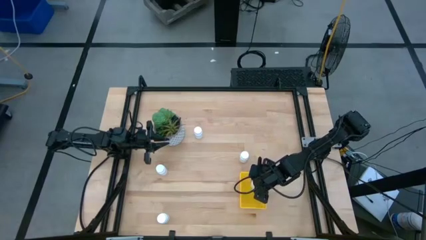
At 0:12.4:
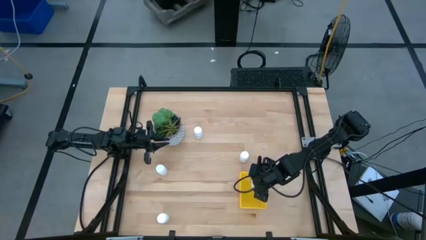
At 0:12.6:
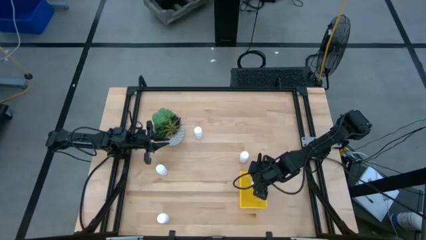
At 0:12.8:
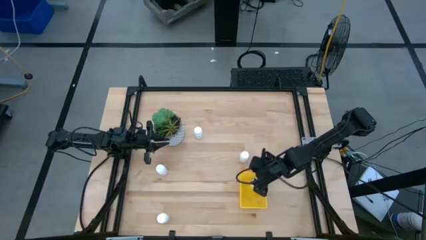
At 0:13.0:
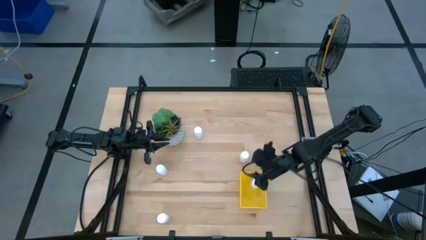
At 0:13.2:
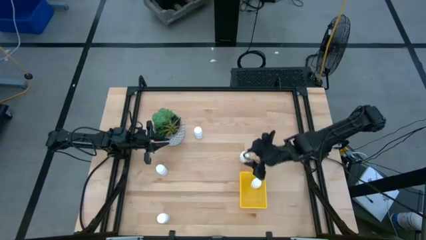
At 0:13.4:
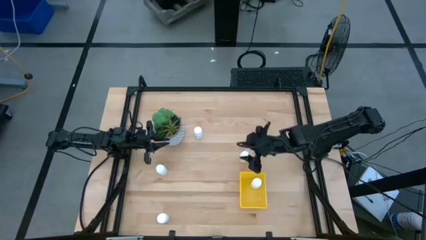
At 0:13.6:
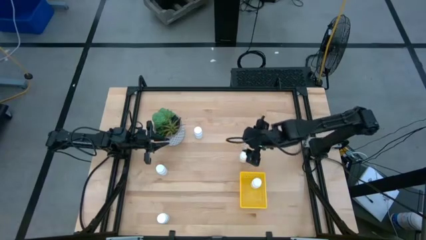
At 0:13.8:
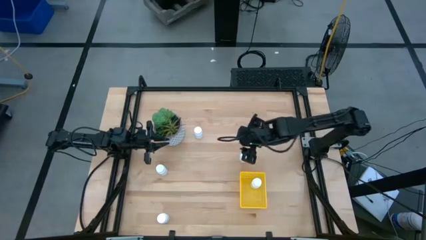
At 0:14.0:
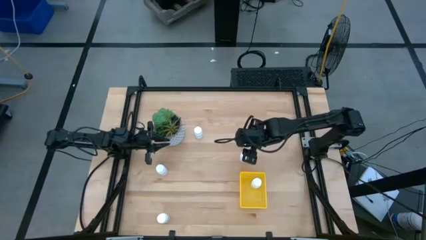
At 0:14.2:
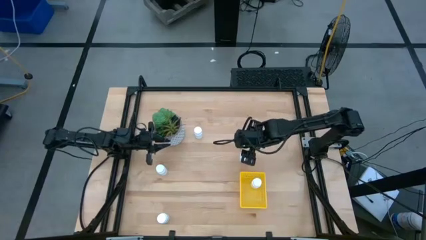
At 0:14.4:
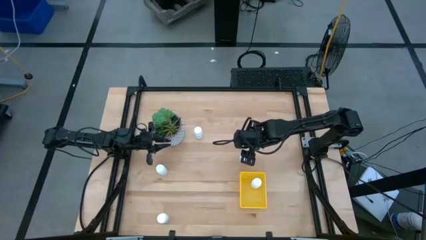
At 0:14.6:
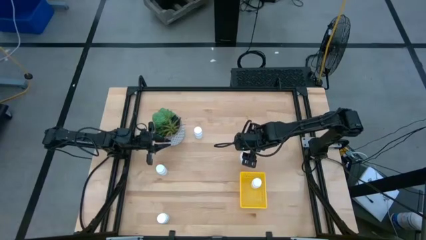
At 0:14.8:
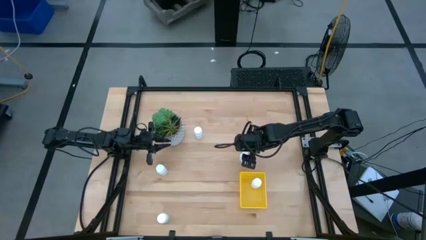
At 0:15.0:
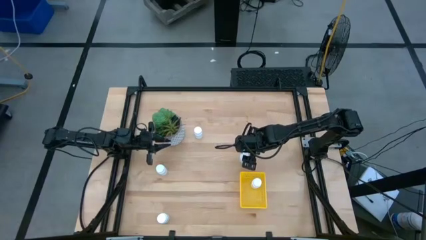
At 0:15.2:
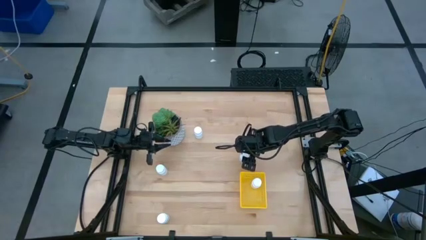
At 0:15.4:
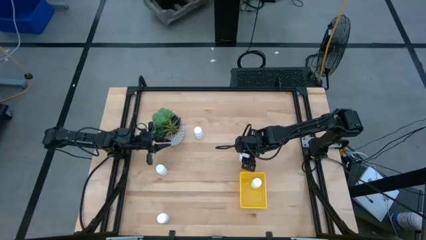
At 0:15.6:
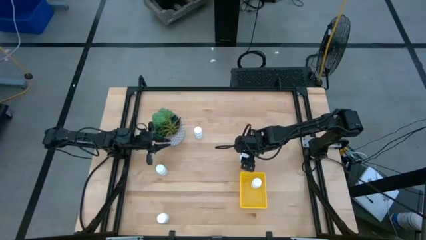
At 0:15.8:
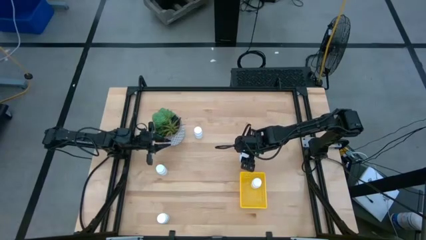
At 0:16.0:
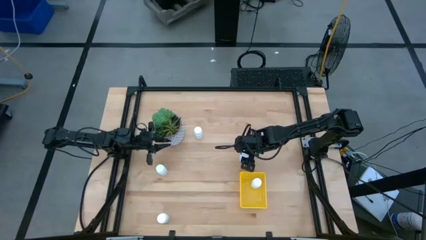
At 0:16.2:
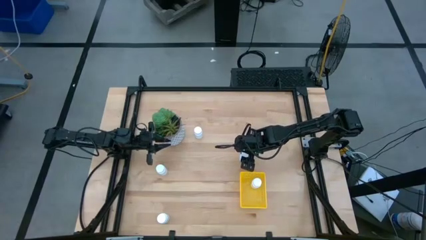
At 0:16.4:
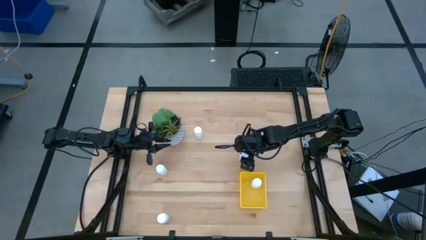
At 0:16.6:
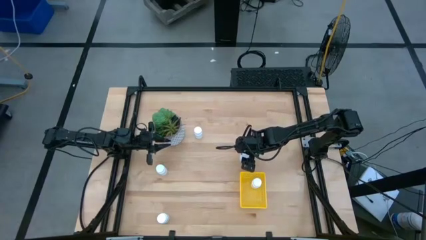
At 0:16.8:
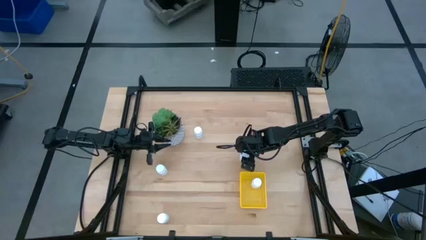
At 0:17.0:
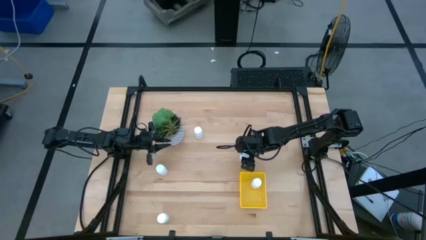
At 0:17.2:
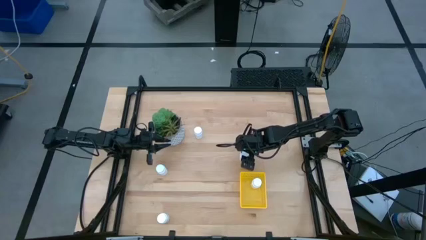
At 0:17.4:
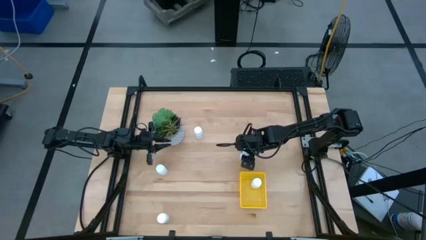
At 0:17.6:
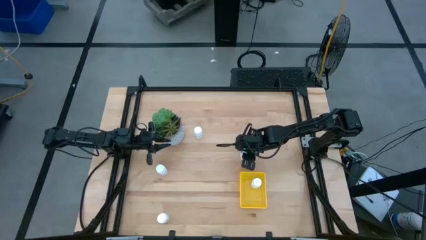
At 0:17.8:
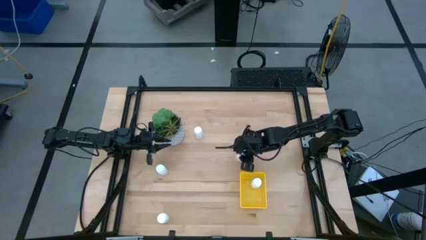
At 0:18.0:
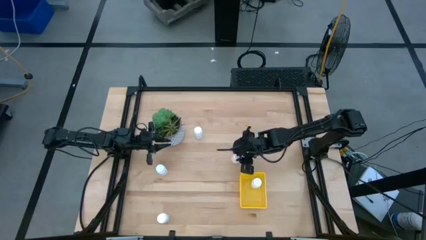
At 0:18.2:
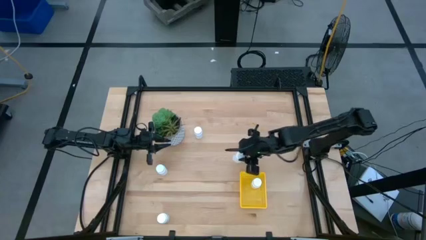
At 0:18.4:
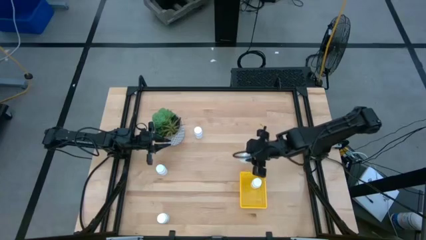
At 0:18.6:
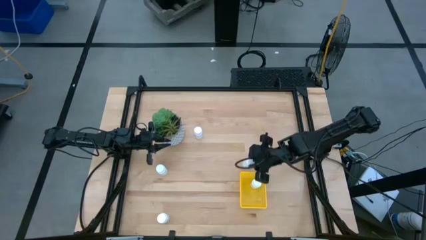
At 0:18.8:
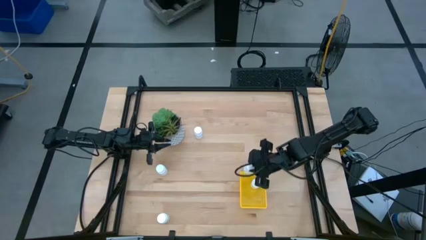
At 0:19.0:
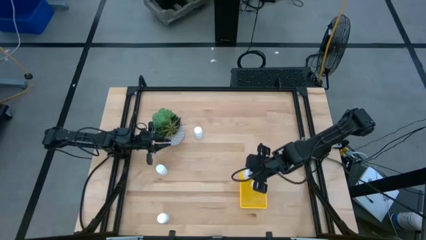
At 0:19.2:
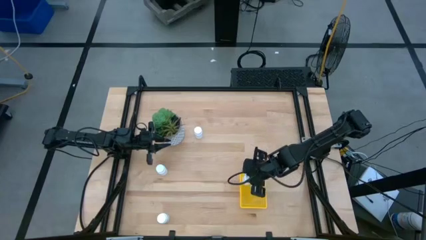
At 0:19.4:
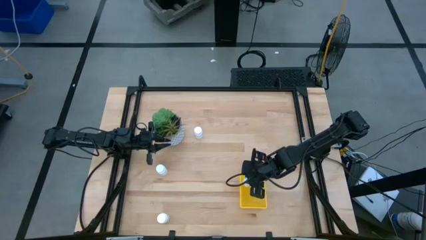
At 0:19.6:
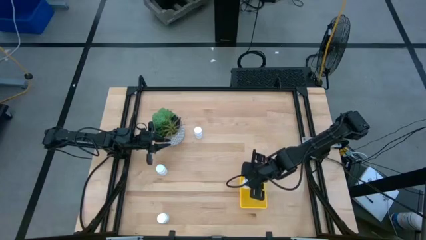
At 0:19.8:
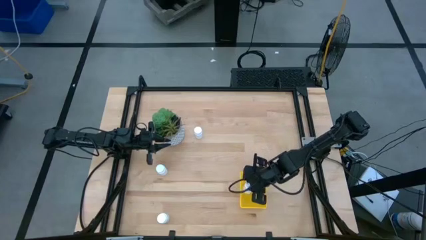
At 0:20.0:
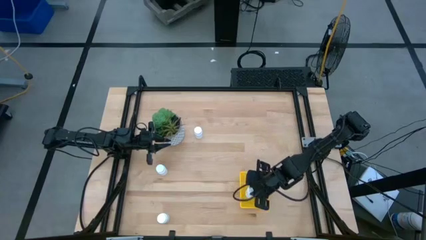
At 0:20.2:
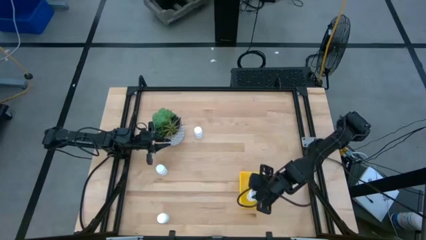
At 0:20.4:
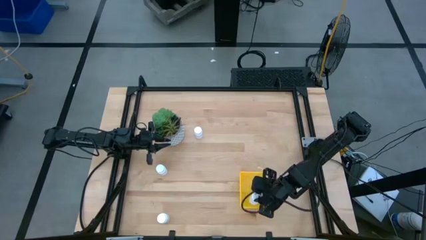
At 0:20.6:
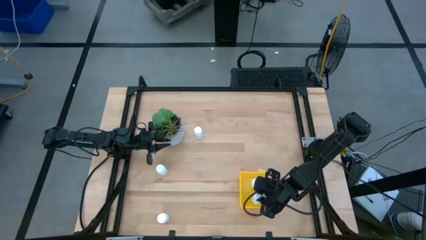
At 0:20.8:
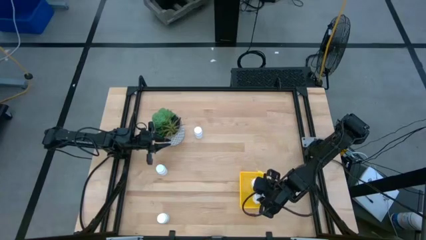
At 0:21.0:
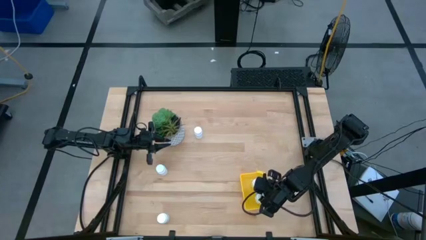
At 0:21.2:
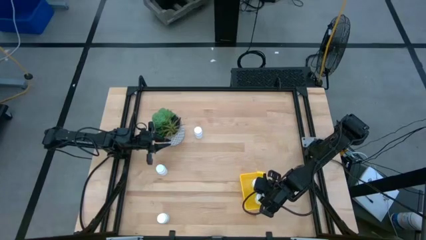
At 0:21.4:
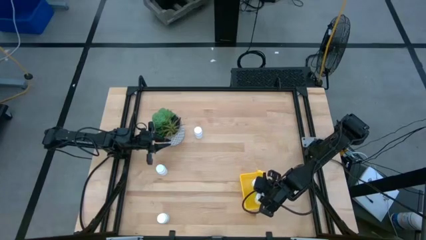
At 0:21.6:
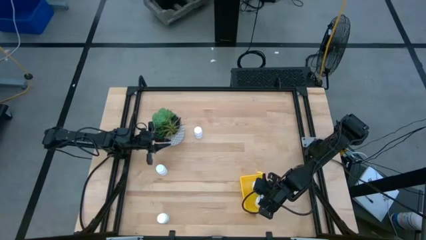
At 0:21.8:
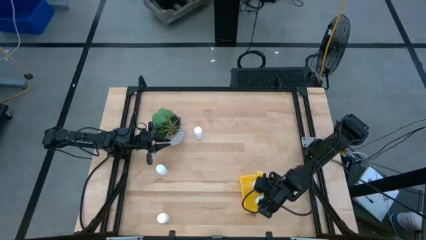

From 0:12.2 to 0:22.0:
Task: Pick and place pill bottles into a basket
Put the pill bottle into the basket
